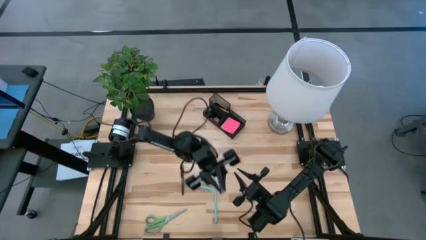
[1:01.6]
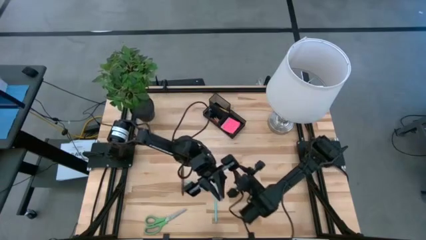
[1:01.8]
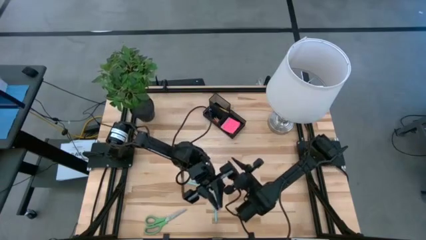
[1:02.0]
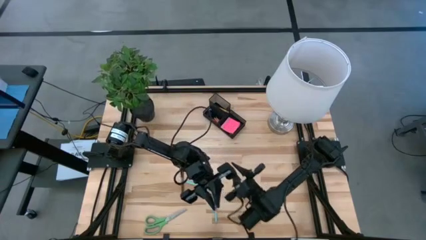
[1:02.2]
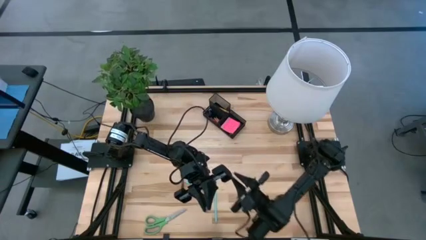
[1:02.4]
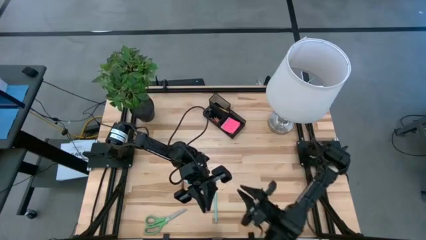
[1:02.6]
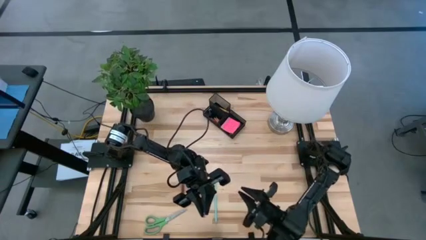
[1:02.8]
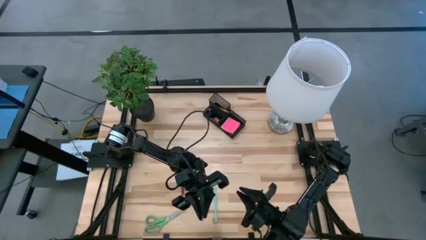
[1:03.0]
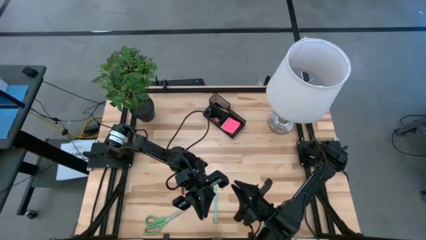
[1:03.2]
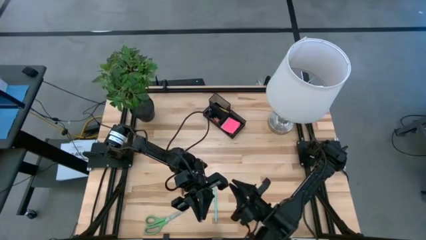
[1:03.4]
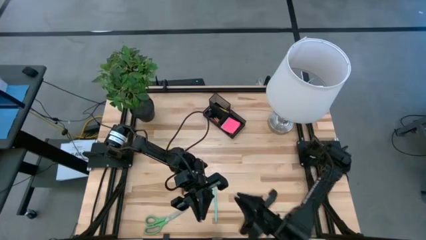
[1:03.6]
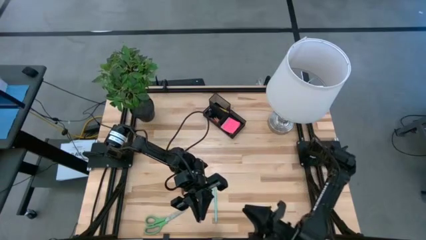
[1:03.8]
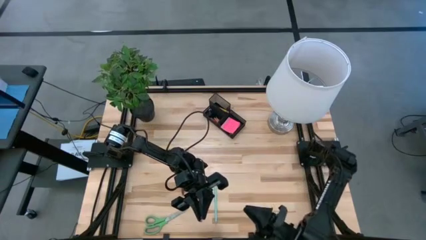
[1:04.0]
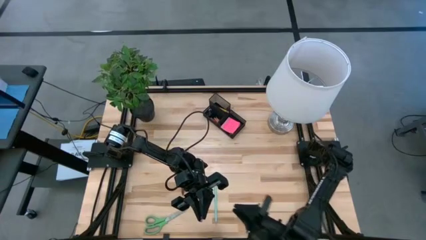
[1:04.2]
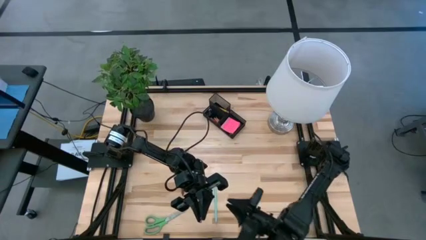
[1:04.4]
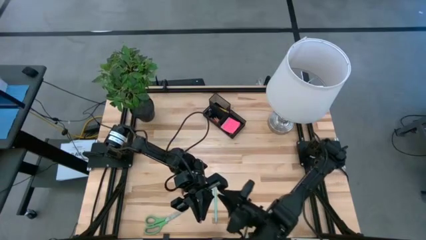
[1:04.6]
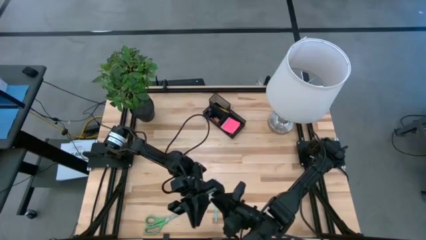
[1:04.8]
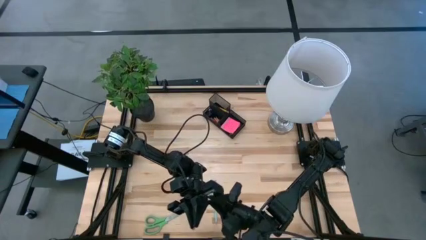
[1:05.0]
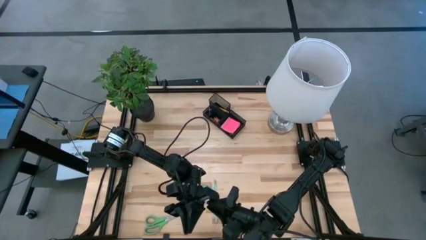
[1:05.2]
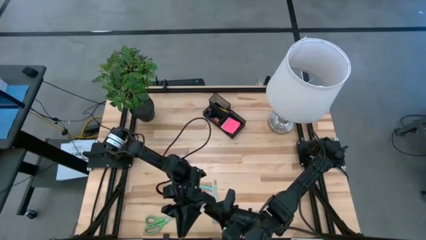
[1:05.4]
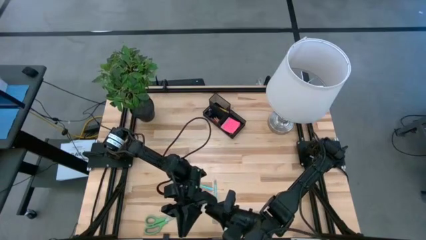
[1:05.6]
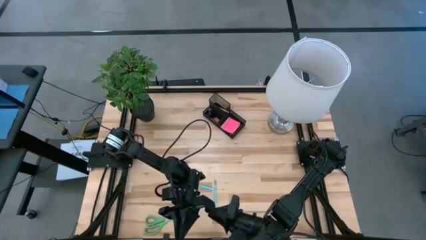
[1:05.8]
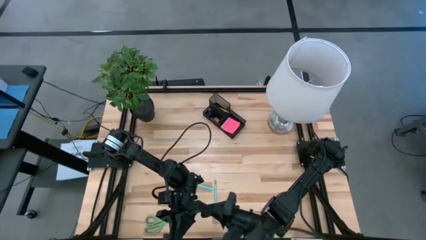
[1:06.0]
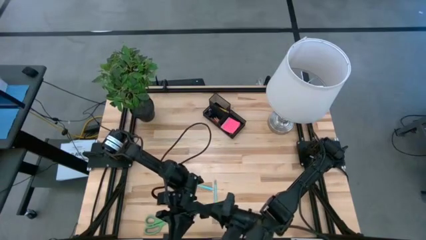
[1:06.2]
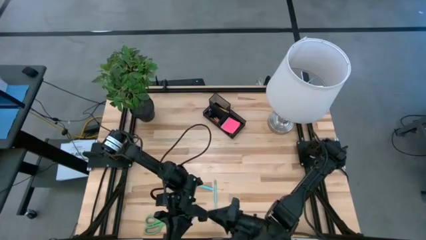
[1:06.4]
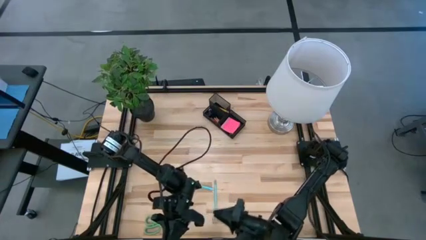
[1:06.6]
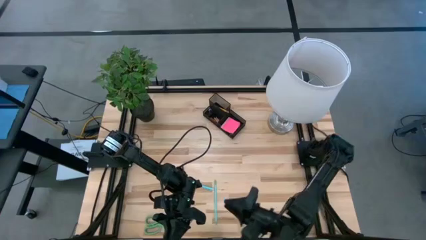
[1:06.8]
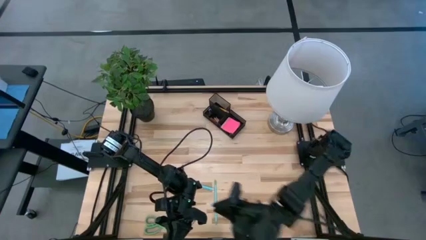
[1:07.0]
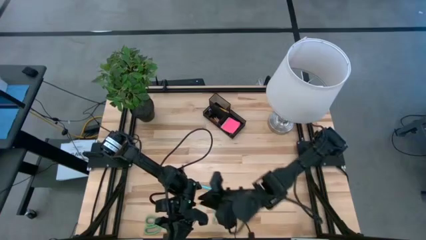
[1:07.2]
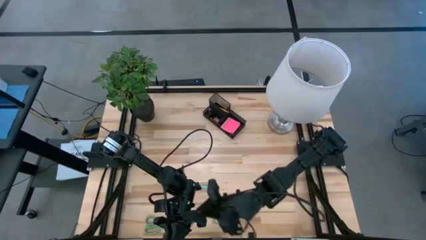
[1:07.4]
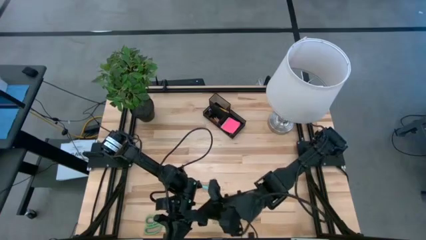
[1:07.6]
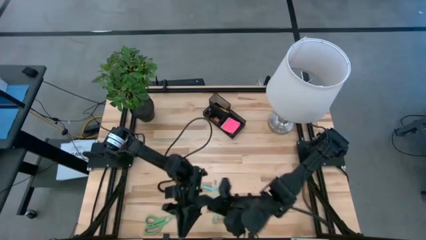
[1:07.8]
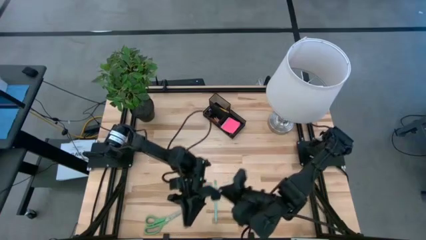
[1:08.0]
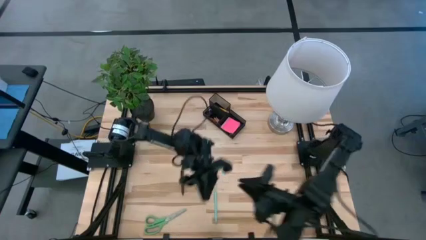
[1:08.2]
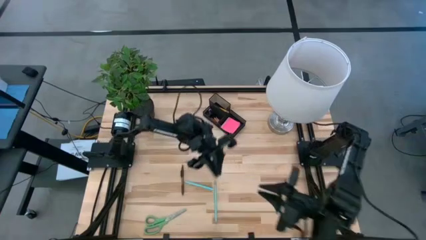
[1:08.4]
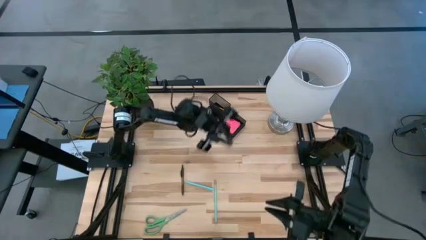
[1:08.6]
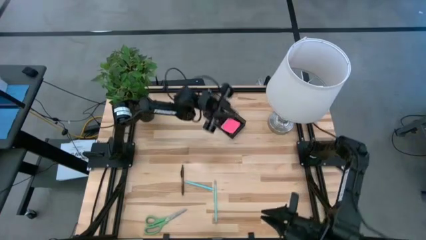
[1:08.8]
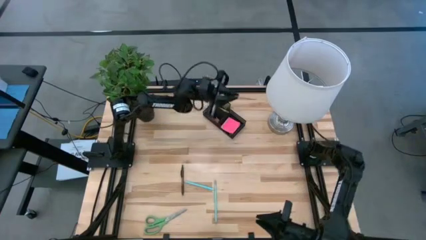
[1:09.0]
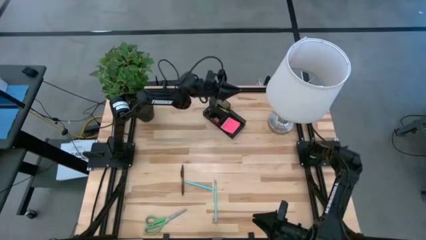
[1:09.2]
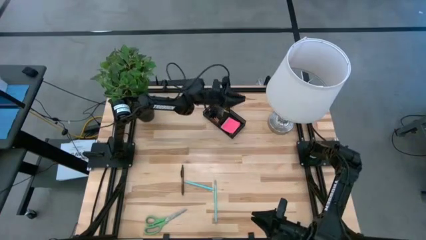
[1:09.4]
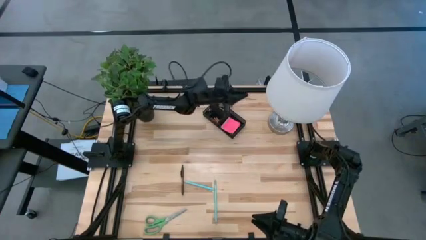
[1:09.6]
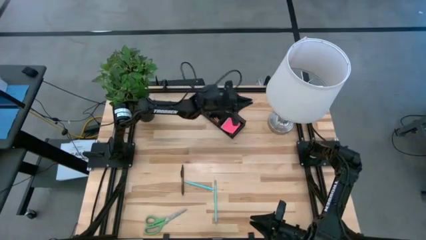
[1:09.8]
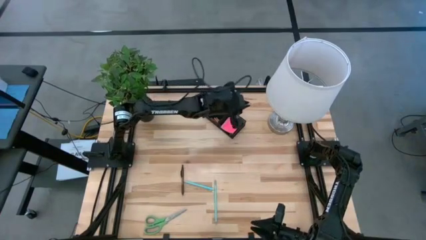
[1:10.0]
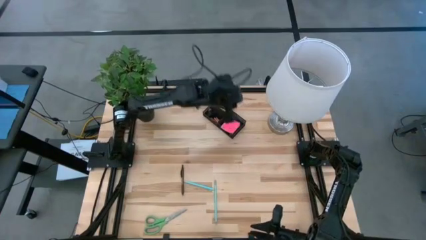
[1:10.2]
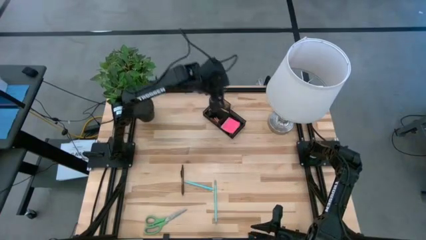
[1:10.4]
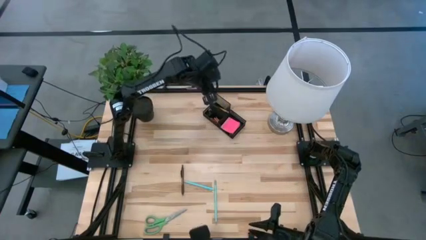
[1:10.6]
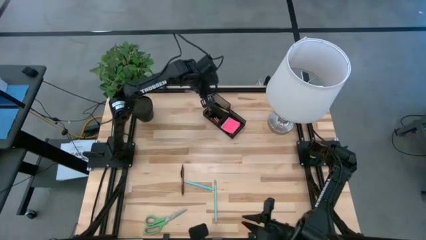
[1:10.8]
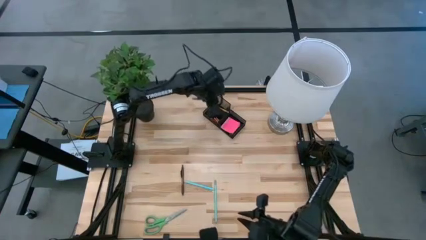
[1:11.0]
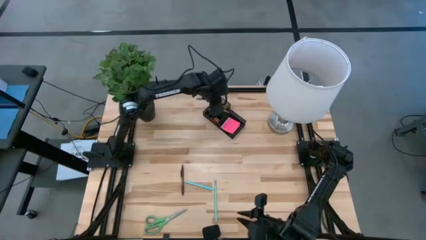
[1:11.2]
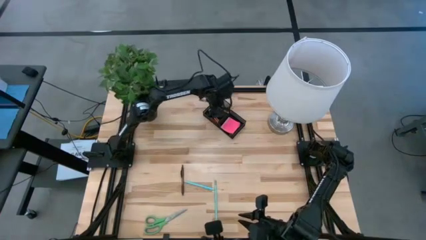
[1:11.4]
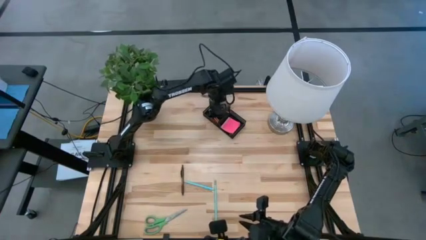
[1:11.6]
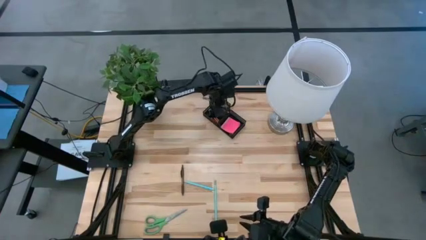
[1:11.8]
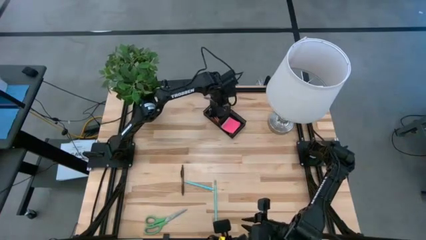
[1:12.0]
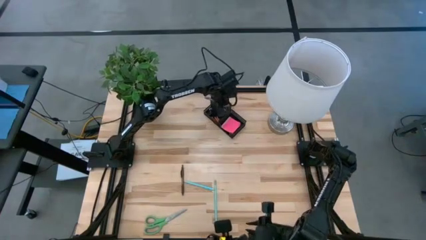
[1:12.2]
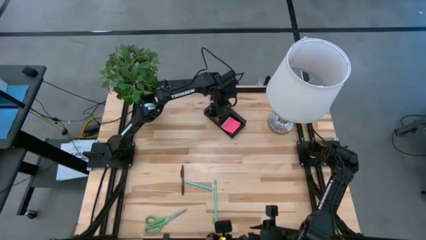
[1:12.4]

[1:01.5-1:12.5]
Task: Pick and place office supplies into organizer
Put the purple pen into the desk organizer

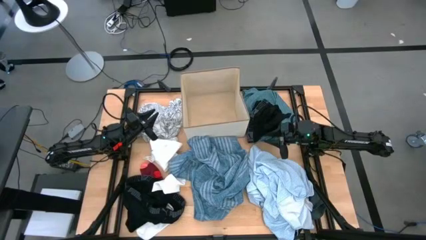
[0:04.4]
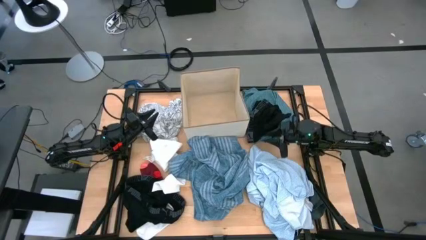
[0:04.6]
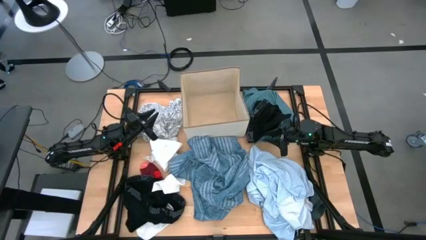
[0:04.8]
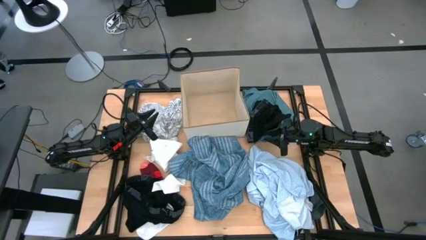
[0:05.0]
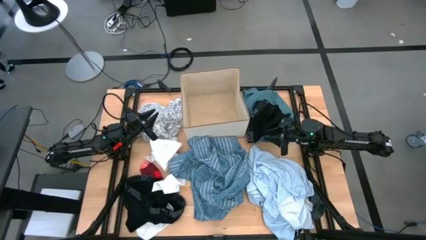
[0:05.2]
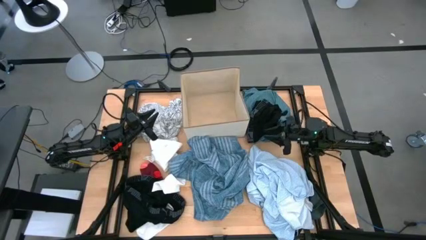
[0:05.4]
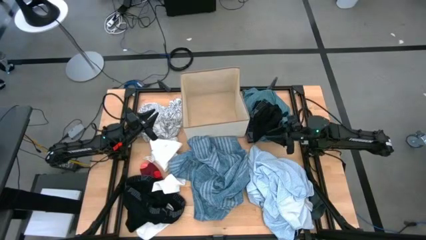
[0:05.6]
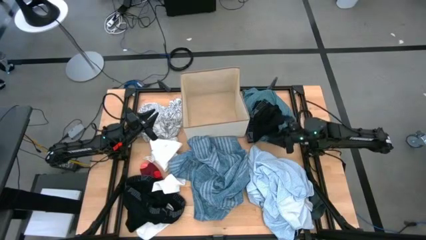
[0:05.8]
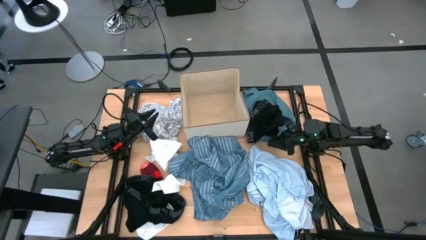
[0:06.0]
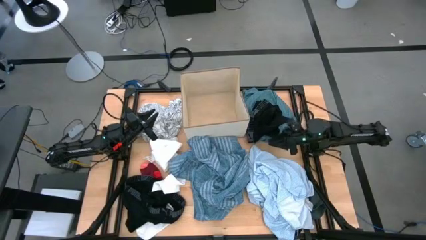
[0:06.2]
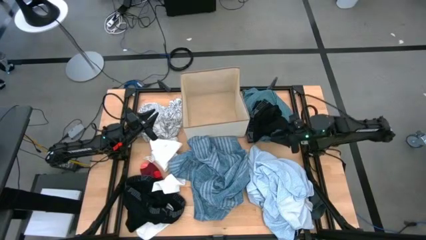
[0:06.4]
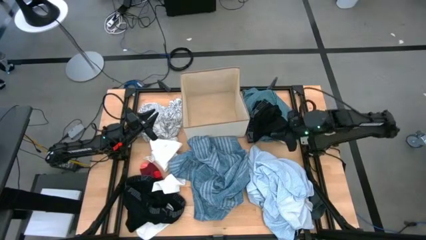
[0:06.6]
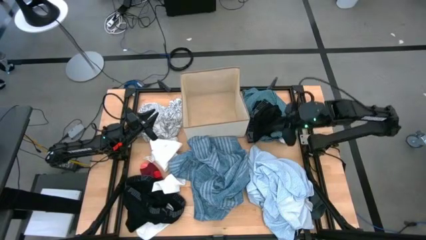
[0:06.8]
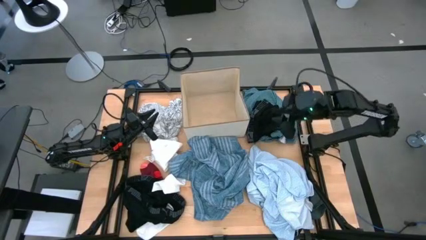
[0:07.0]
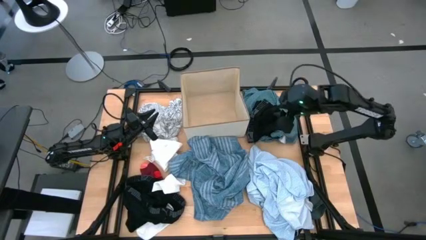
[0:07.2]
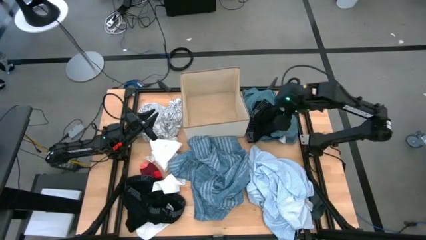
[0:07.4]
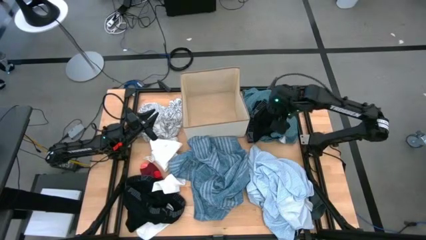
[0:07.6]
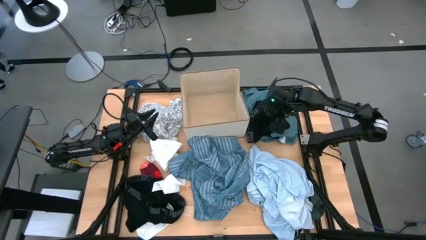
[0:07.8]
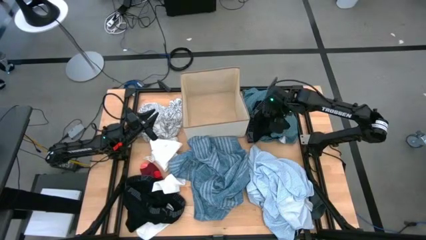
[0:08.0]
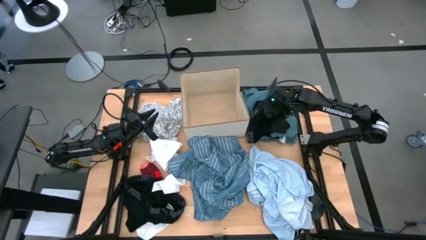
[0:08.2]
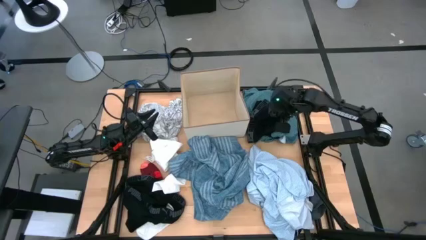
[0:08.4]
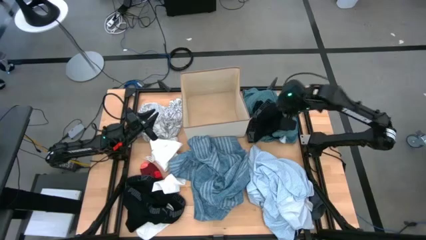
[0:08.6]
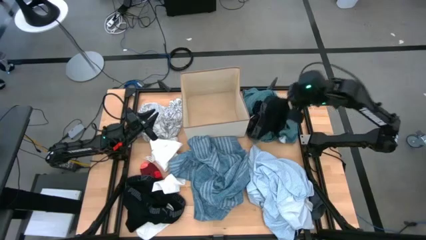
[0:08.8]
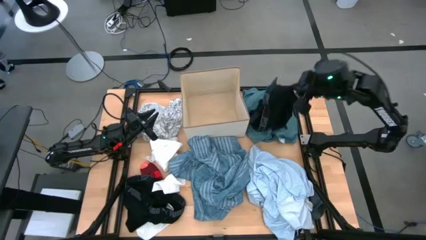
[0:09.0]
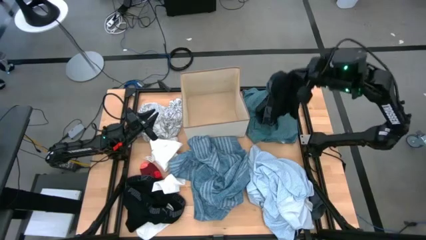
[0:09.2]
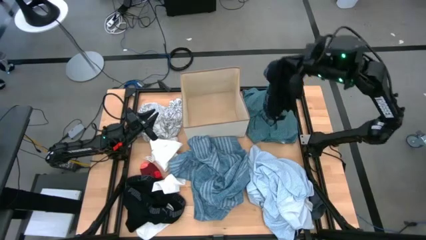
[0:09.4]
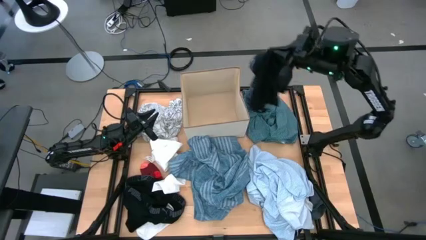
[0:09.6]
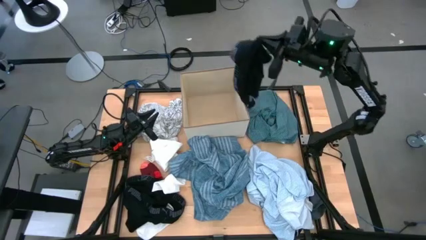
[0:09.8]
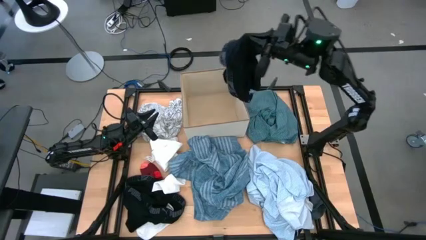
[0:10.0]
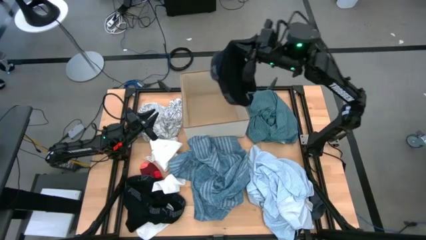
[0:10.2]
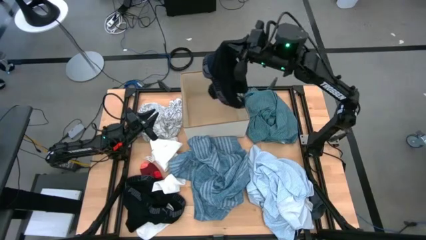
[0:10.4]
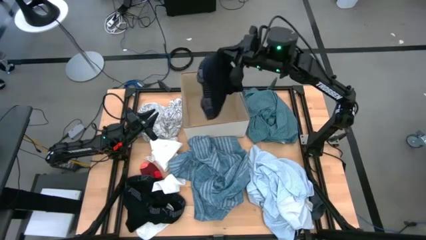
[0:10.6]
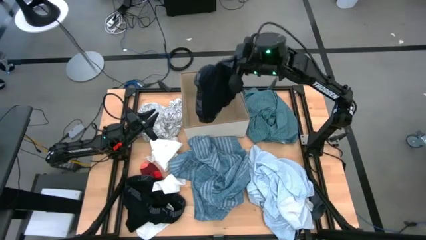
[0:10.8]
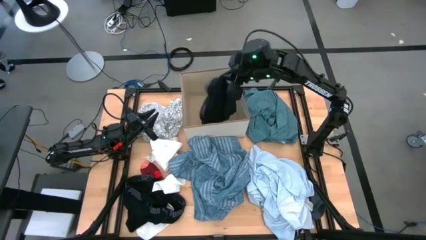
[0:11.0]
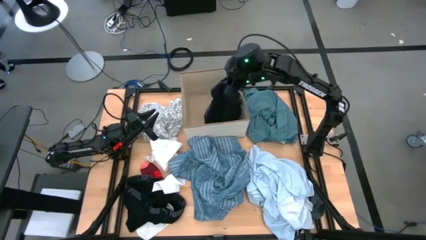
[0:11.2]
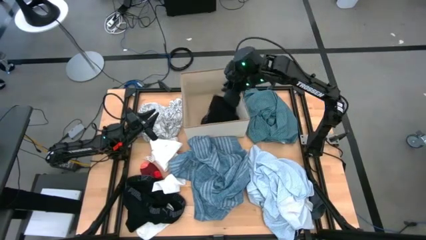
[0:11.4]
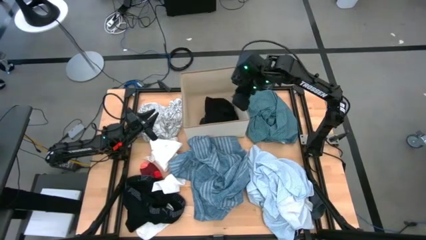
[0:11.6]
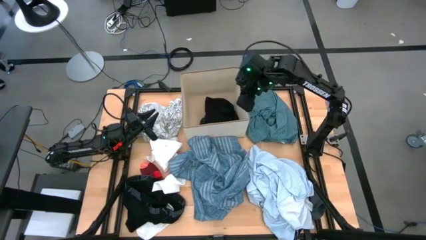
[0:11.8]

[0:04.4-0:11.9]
Task: Sort clothes
Put the black boxer into the laundry bin
